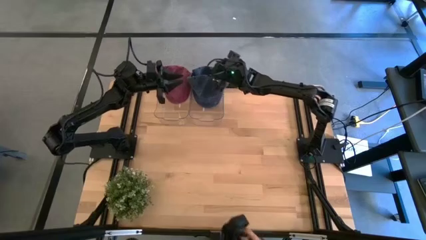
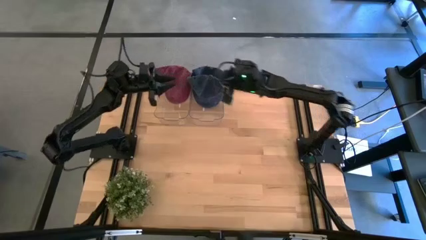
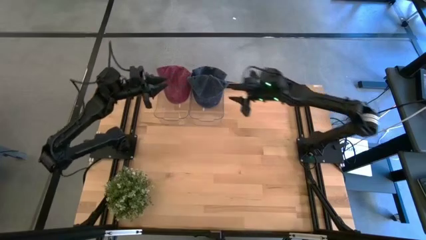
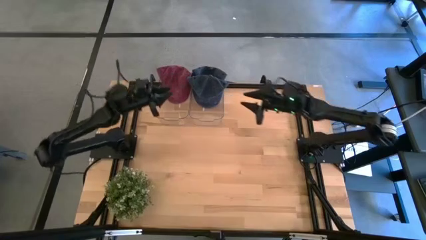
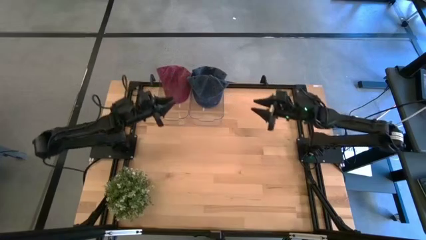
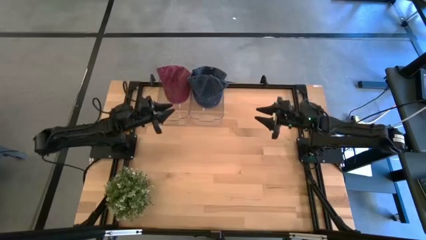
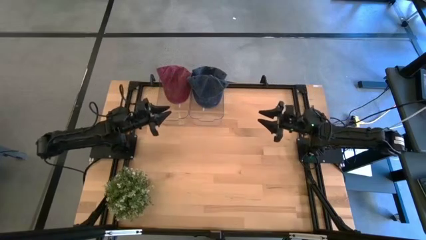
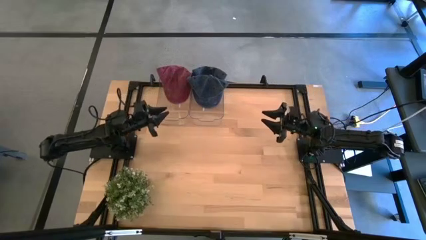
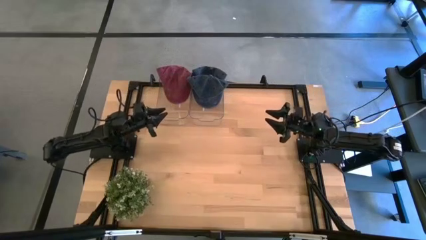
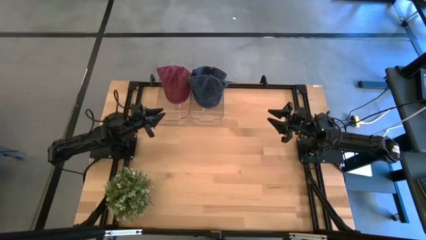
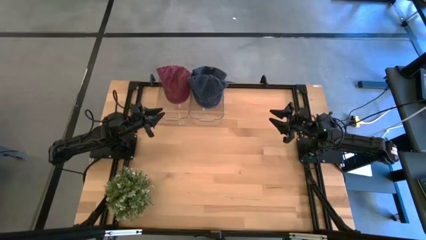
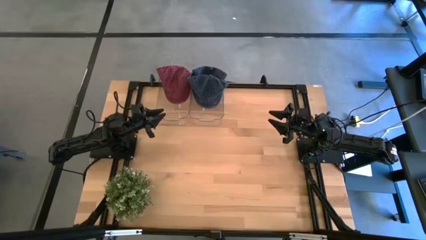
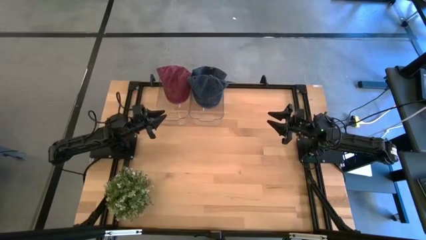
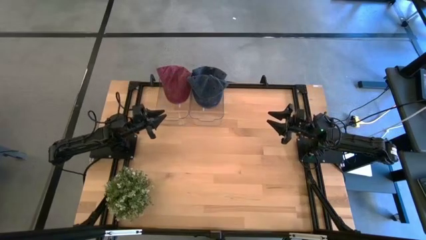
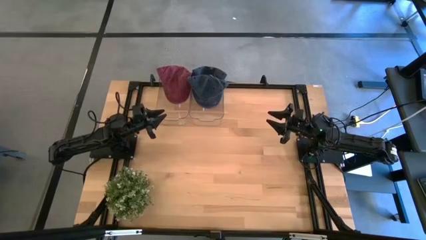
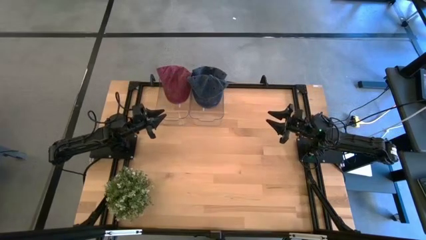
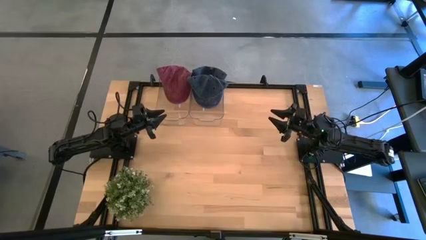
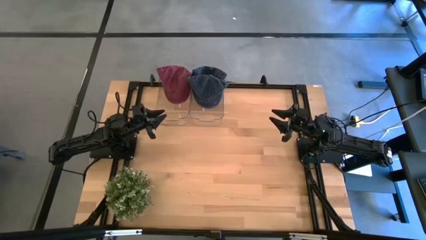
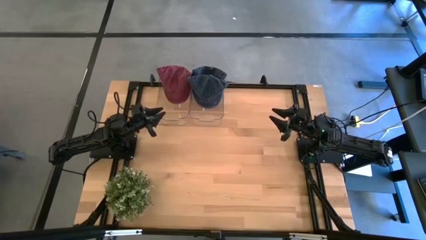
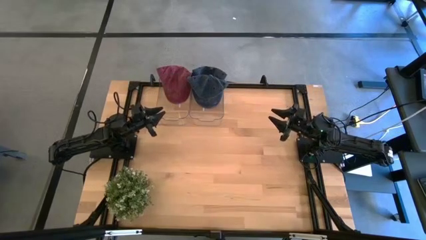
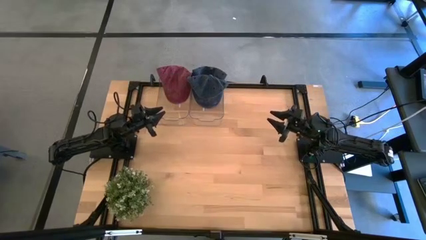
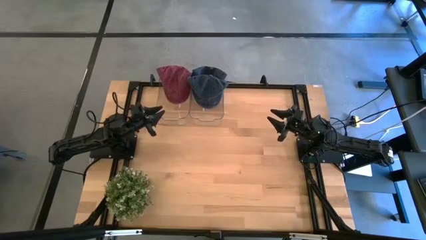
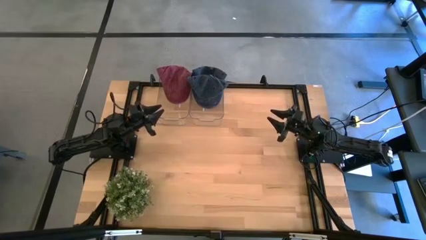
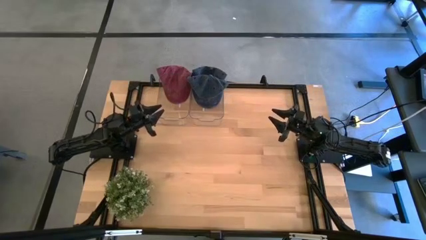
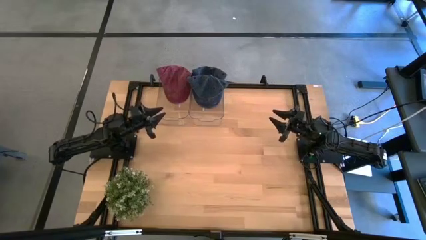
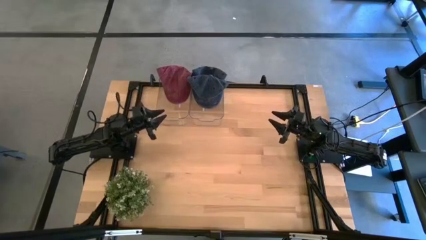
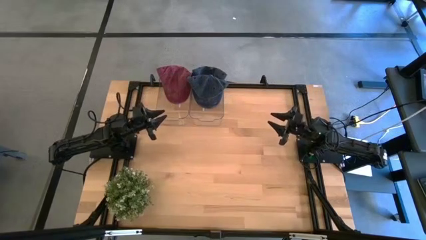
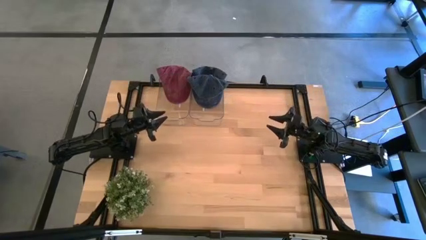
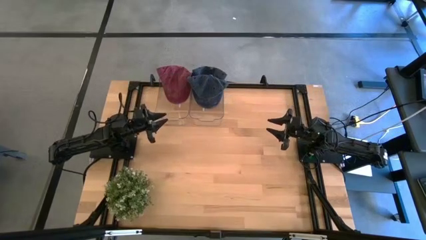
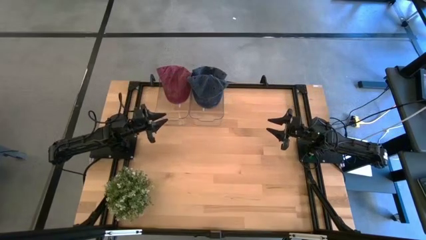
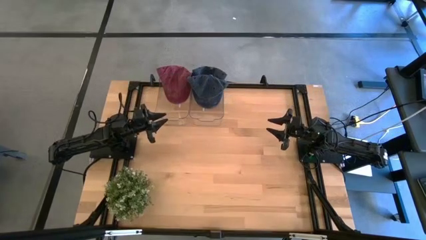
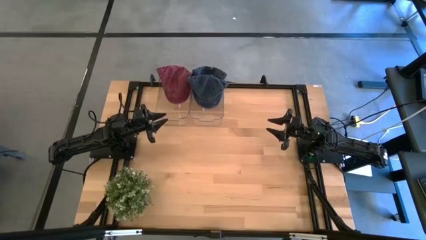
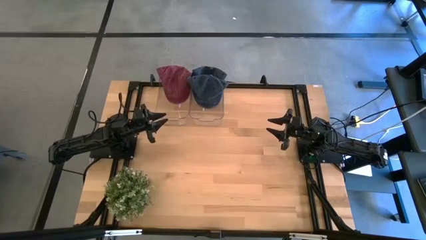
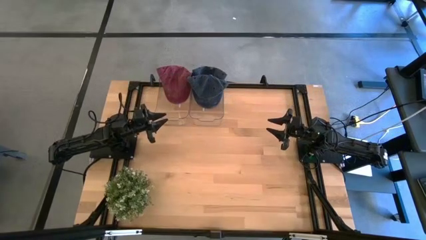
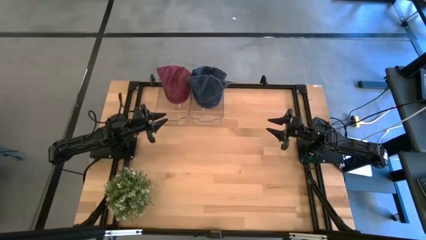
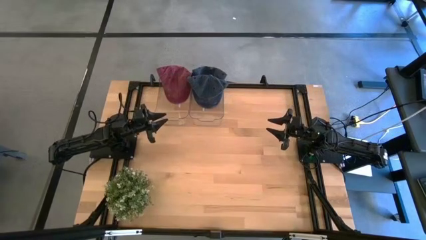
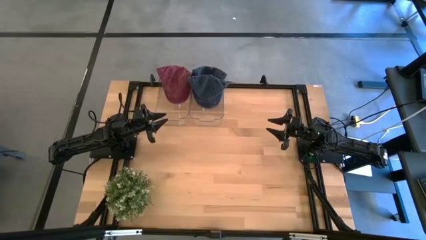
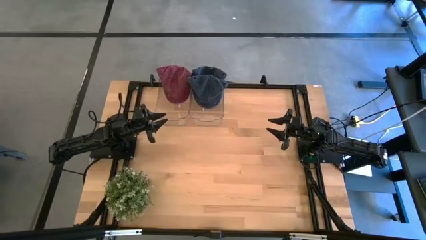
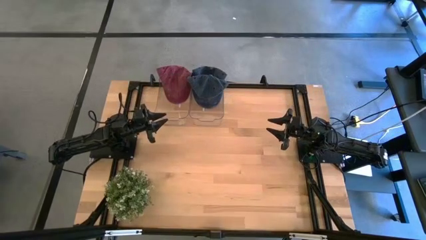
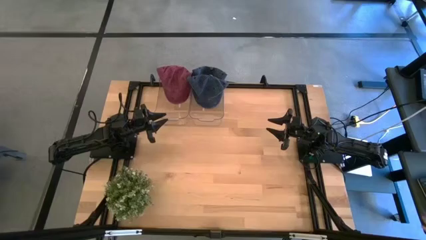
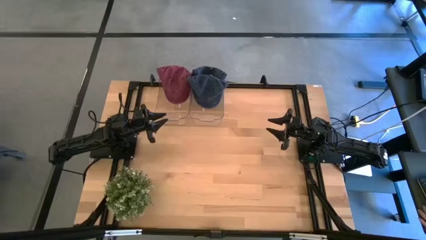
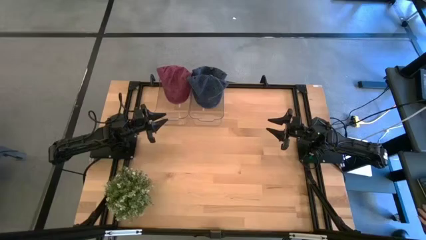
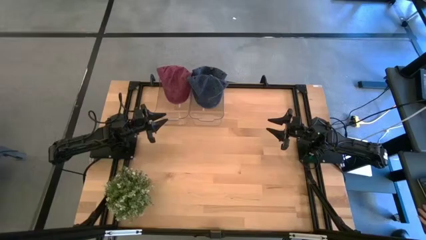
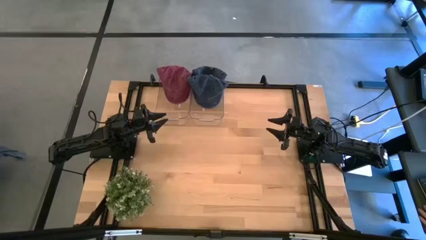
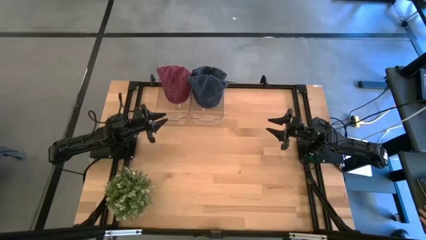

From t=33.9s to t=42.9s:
Task: Pick & Place hat
Return to Home Position

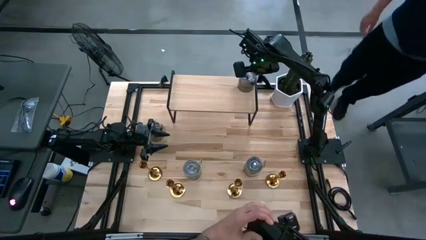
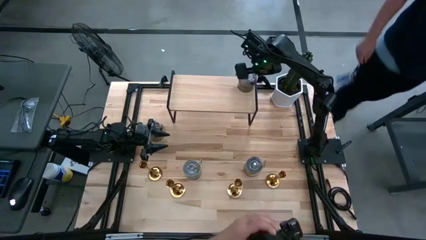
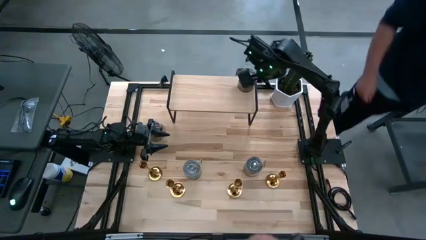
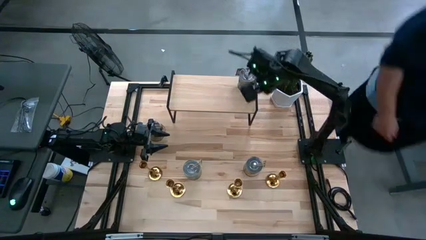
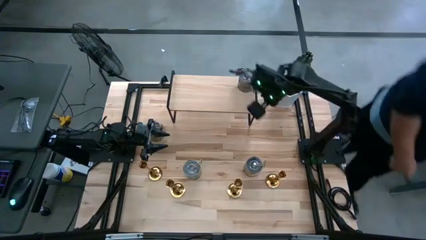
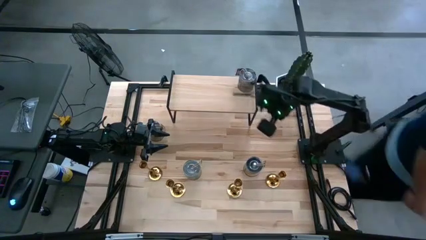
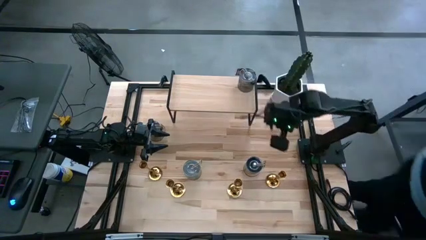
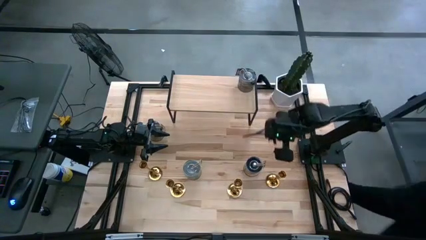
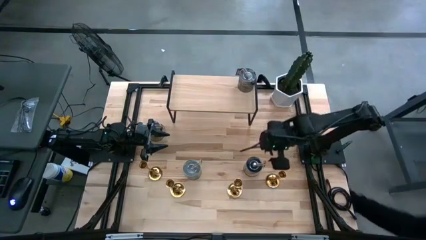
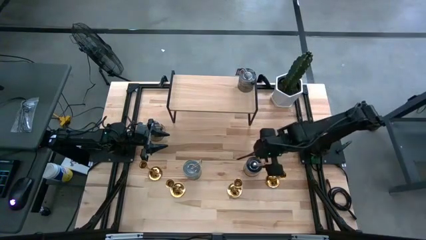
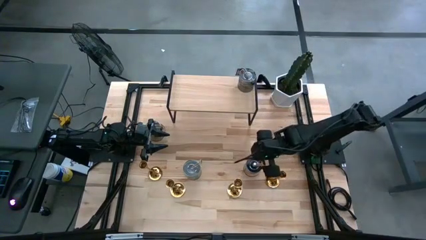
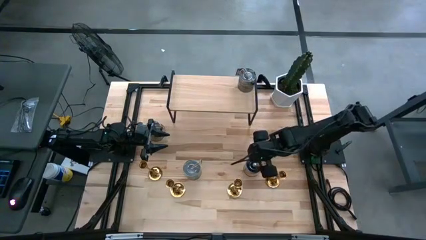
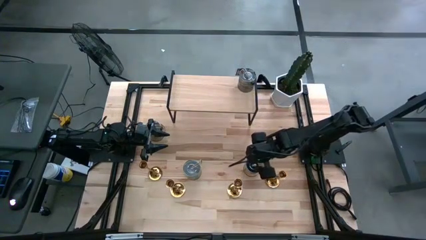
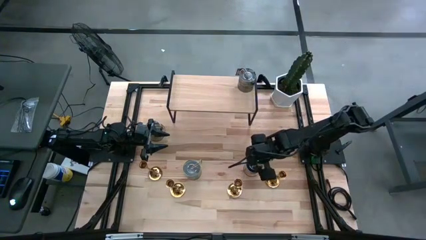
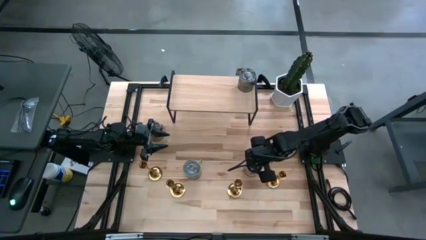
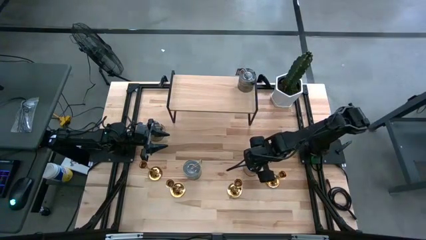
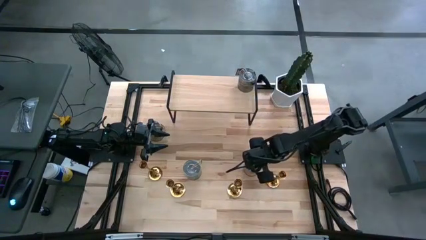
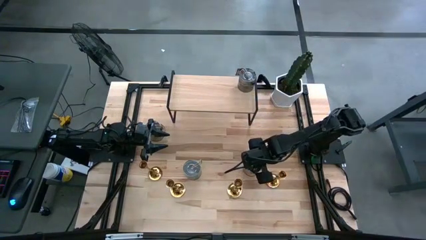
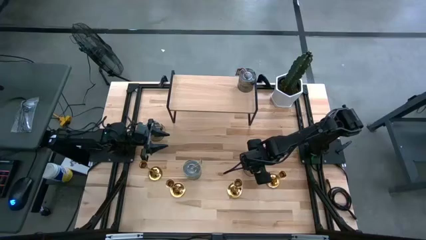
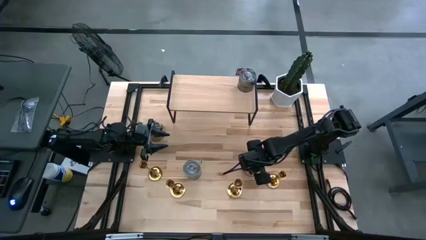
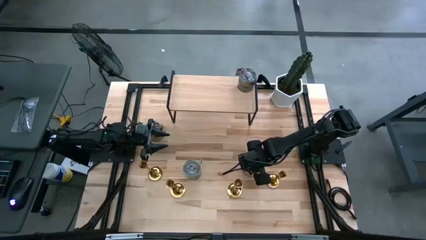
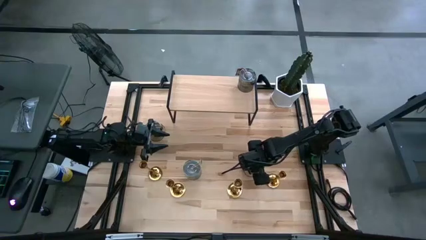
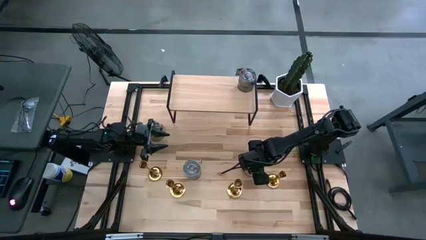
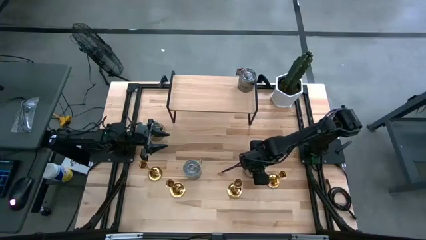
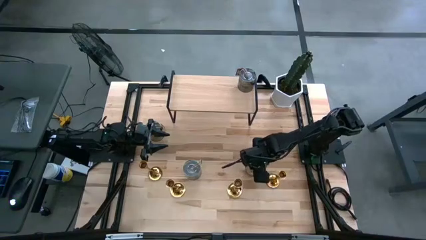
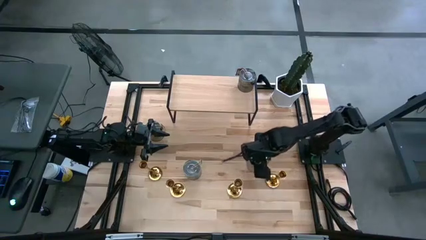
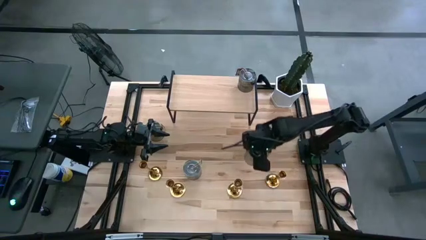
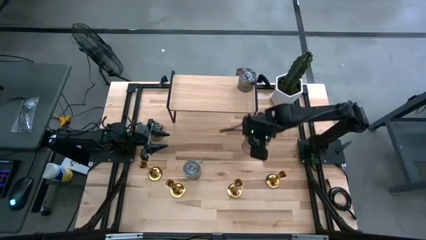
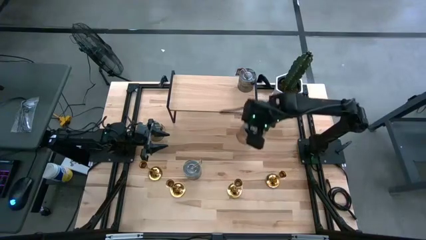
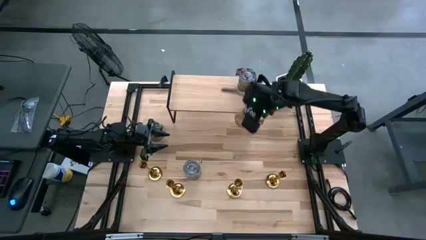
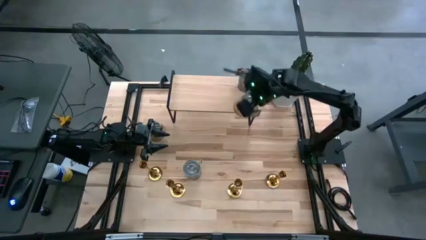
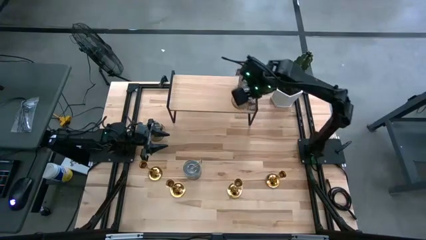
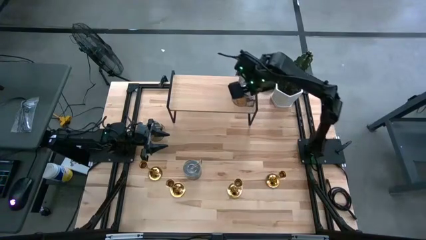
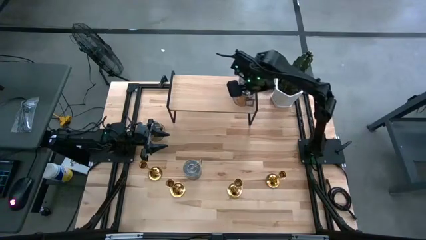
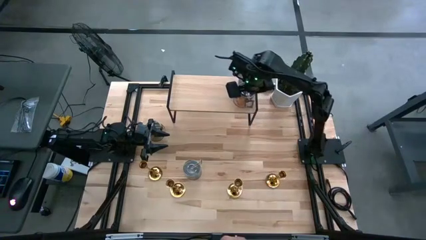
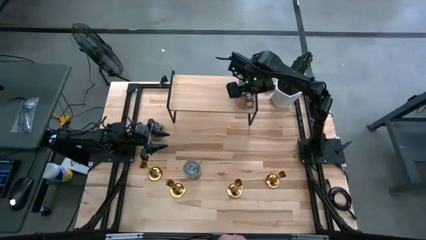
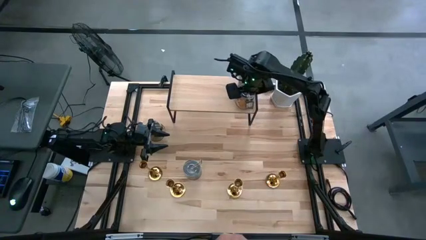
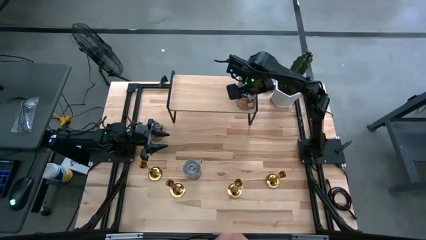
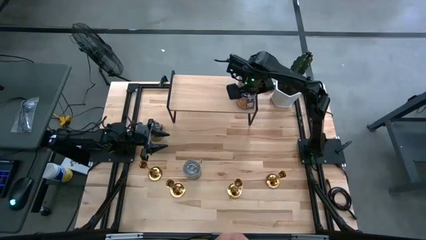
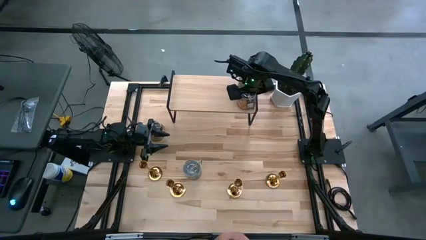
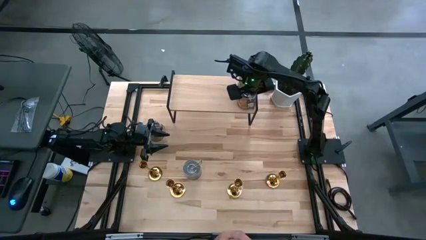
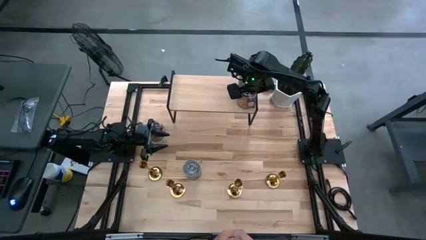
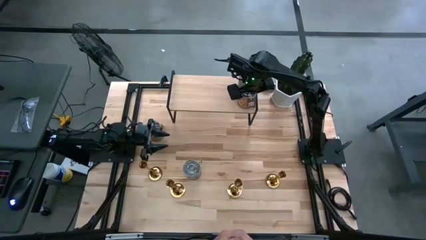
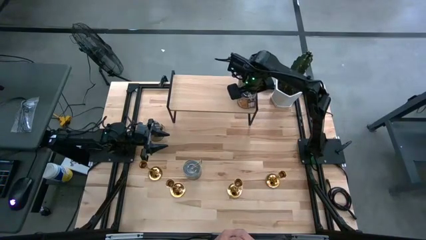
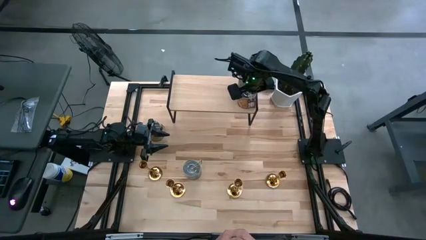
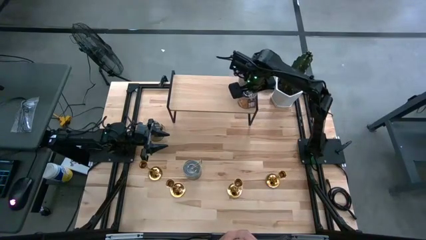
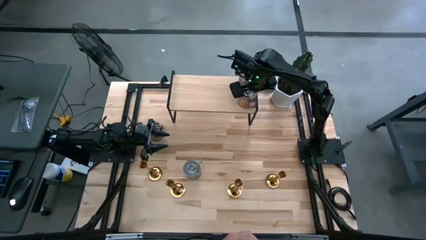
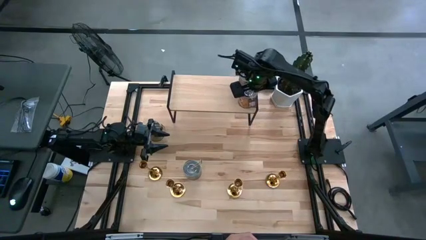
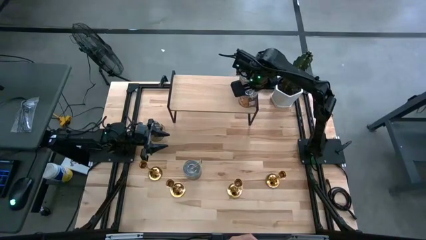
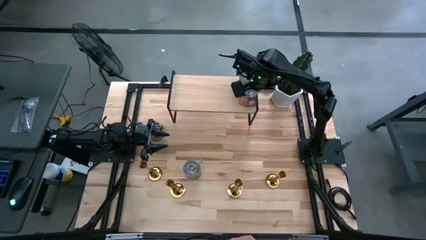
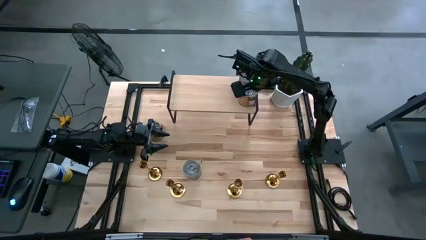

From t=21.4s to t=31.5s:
Task: Pick & Place candle stick holders
Put the silver scented candle on the shelf
